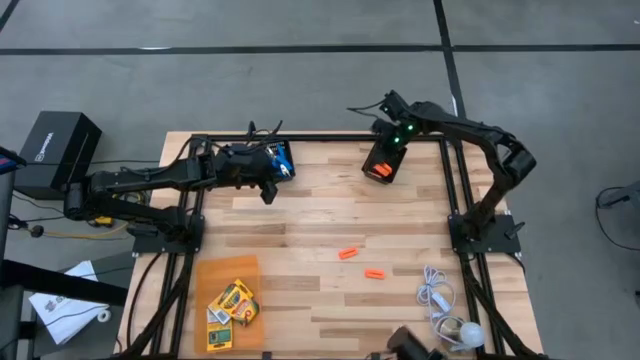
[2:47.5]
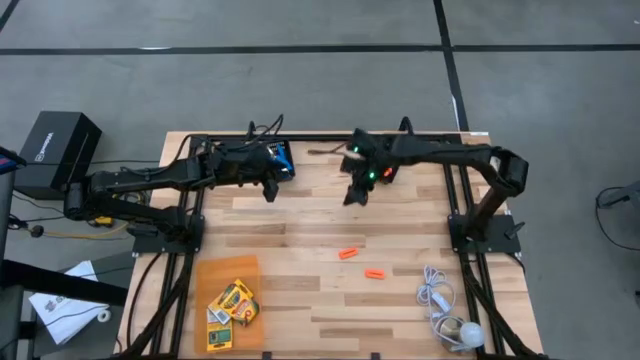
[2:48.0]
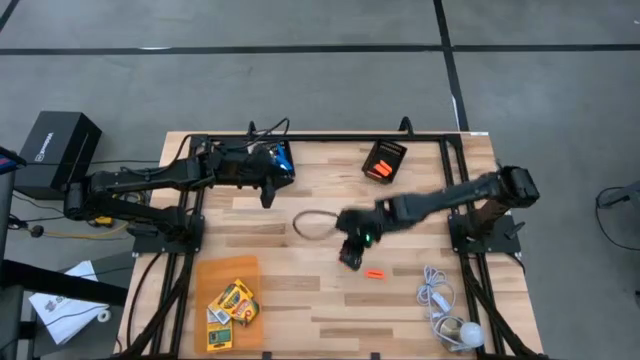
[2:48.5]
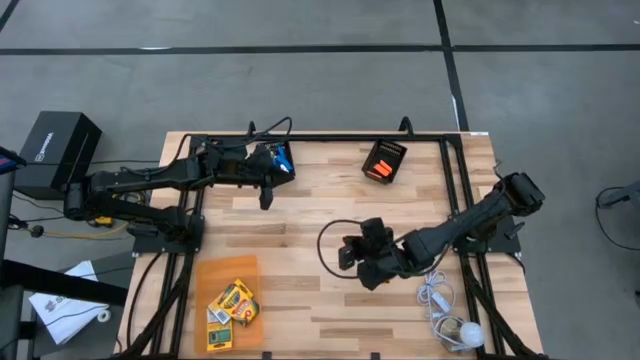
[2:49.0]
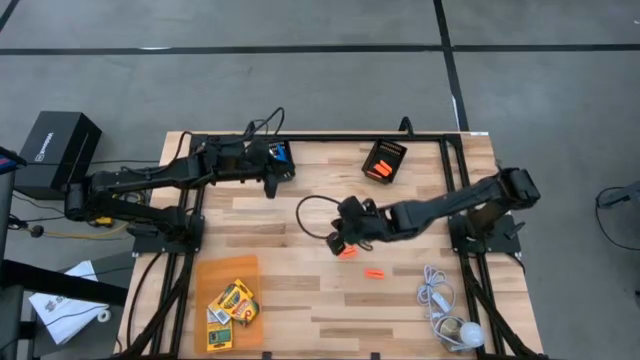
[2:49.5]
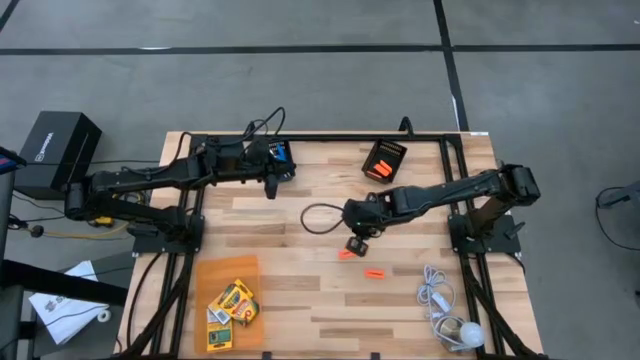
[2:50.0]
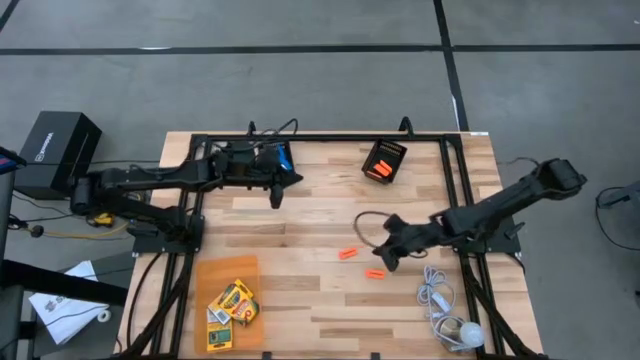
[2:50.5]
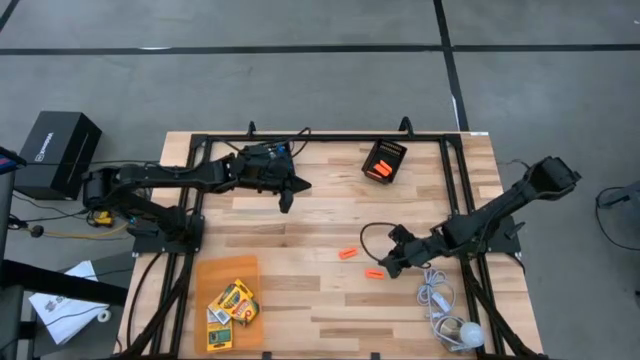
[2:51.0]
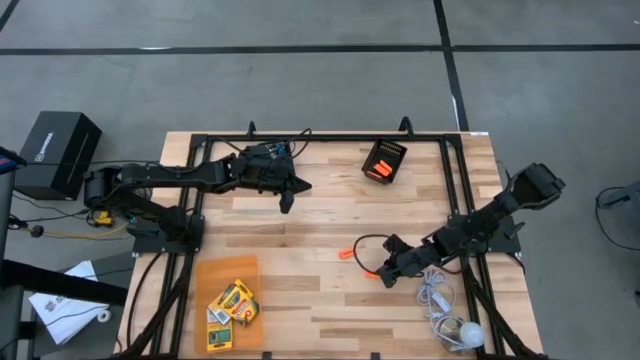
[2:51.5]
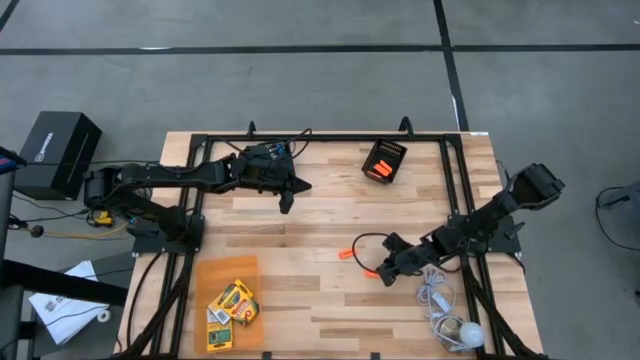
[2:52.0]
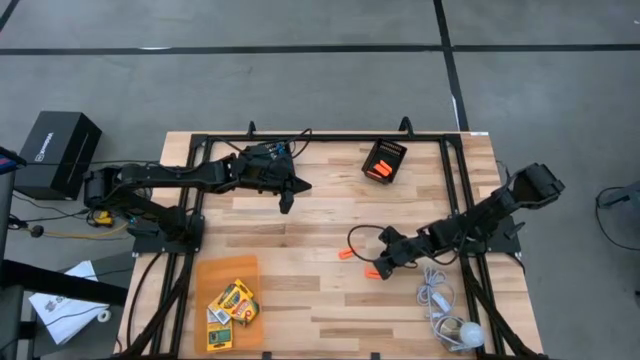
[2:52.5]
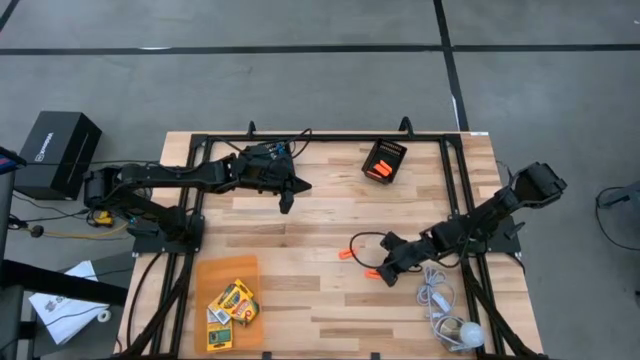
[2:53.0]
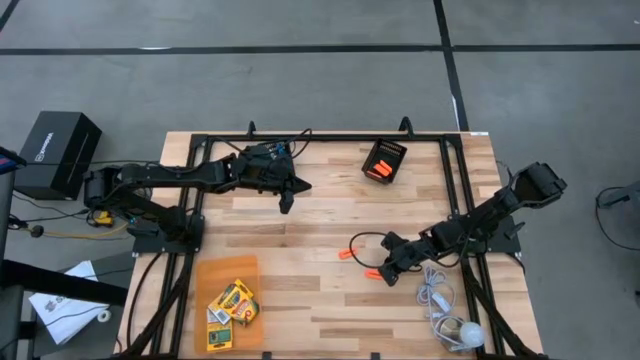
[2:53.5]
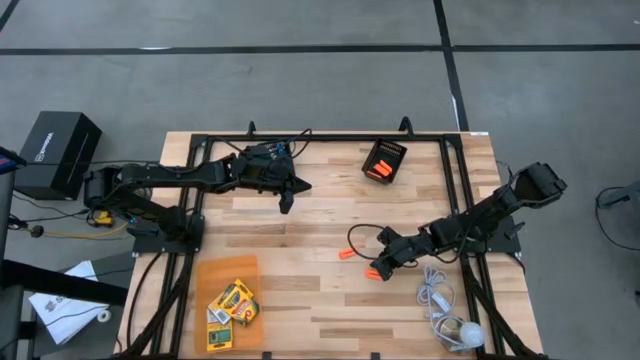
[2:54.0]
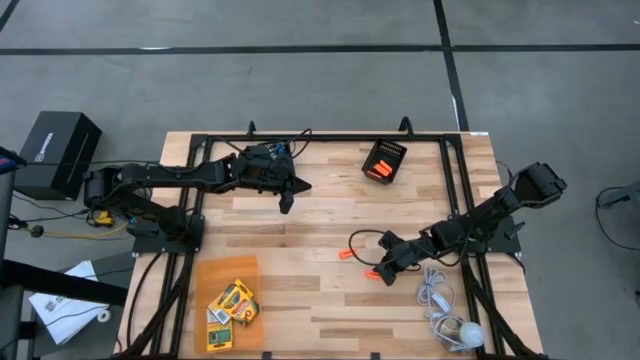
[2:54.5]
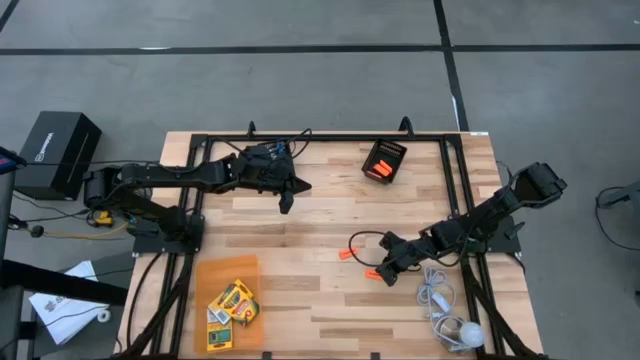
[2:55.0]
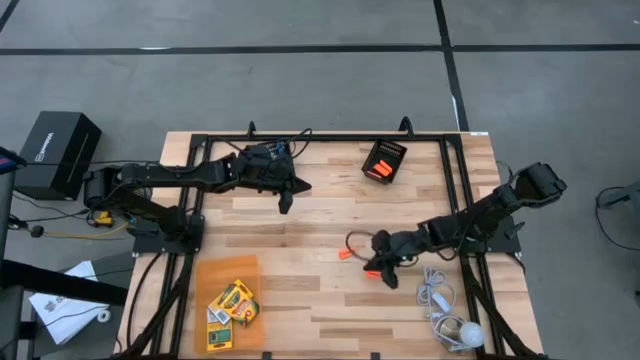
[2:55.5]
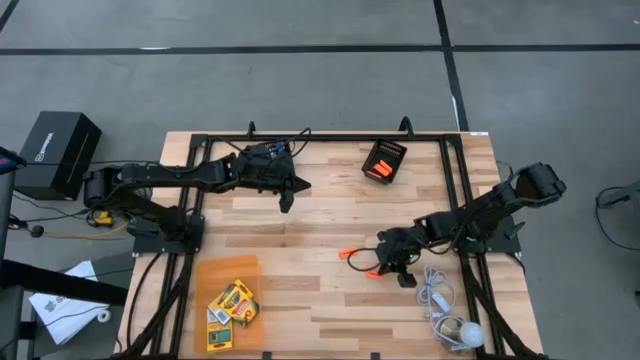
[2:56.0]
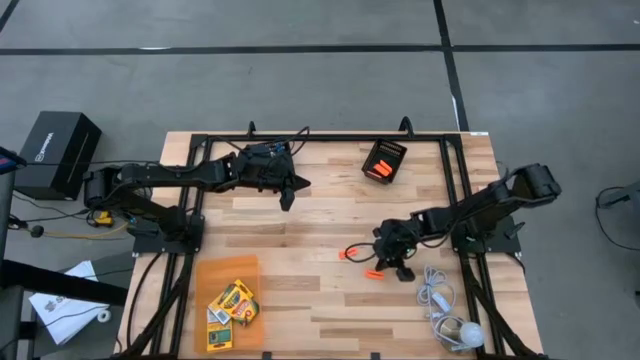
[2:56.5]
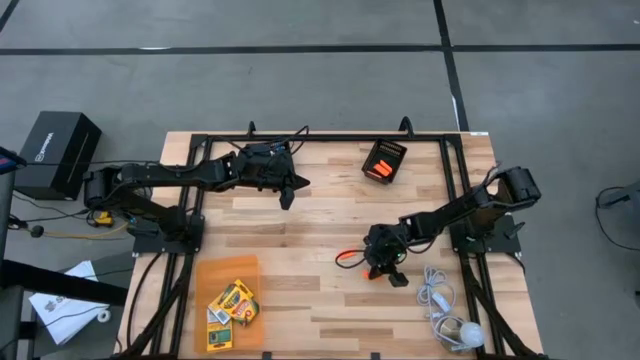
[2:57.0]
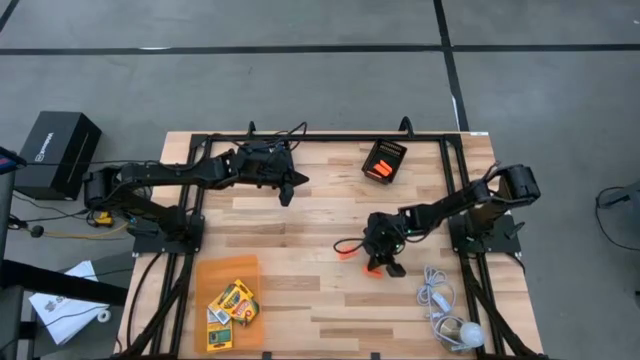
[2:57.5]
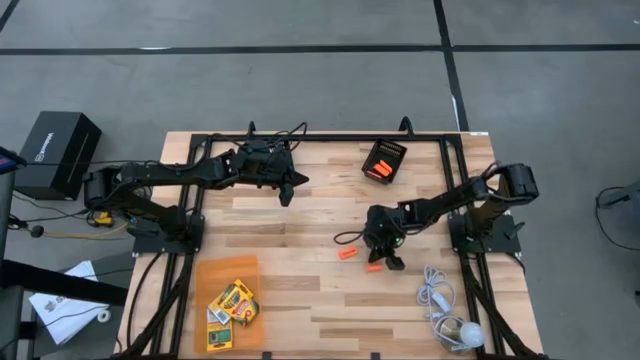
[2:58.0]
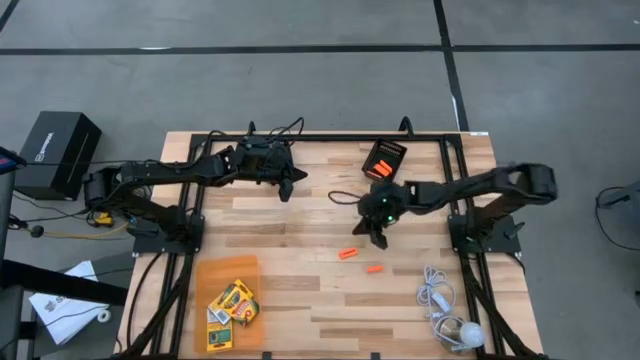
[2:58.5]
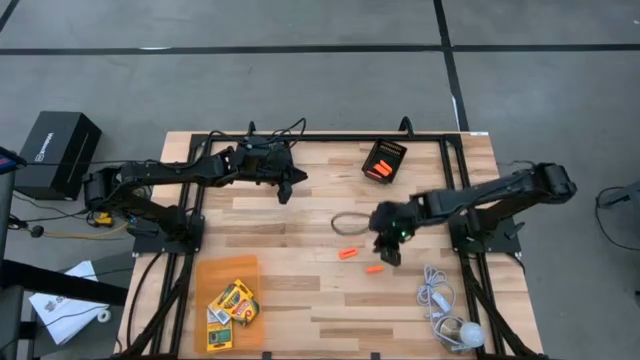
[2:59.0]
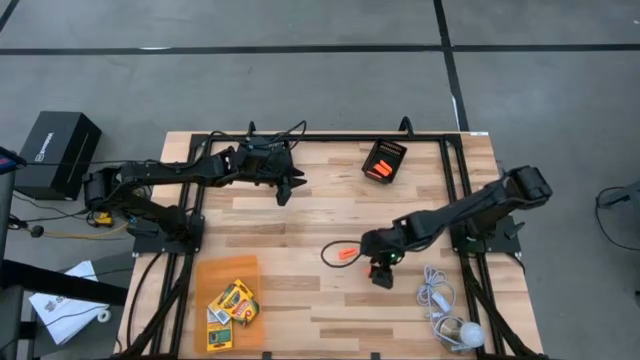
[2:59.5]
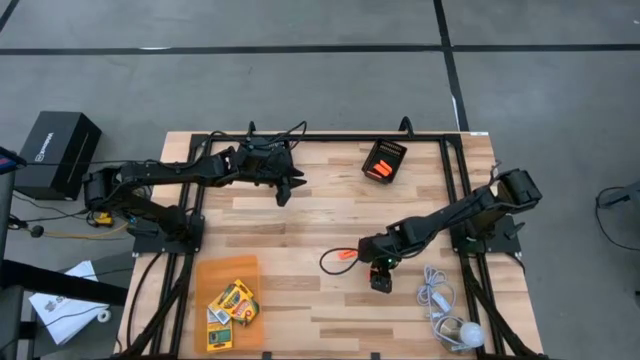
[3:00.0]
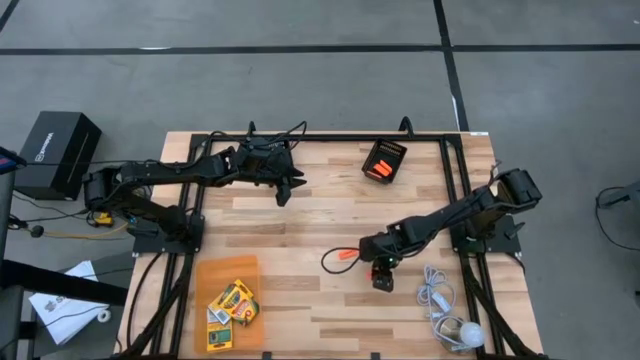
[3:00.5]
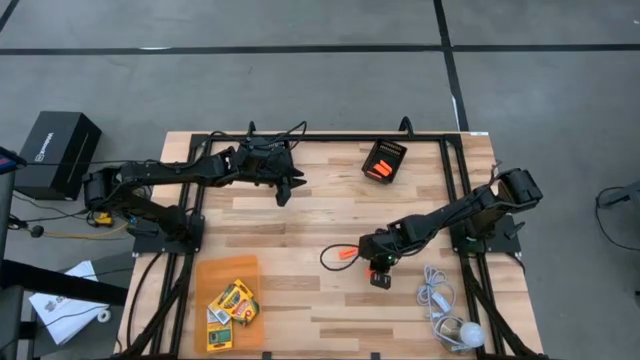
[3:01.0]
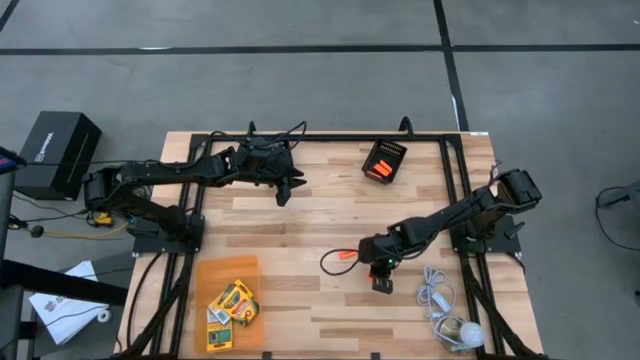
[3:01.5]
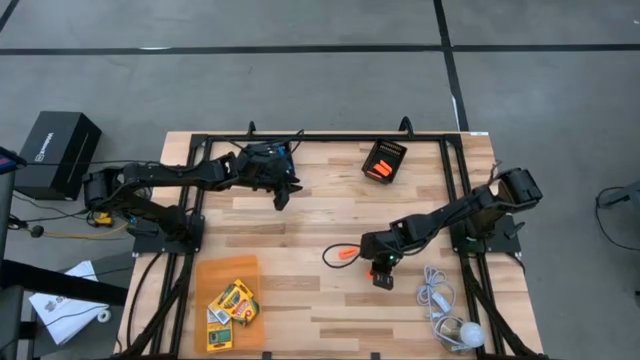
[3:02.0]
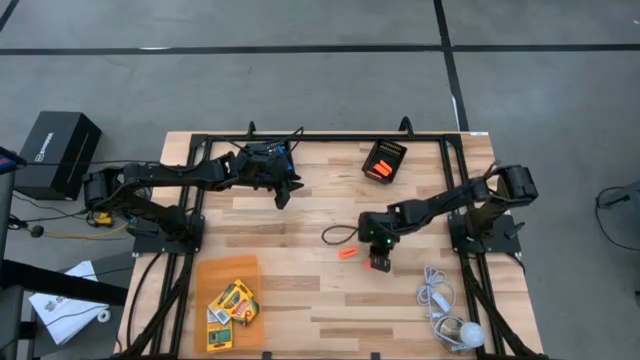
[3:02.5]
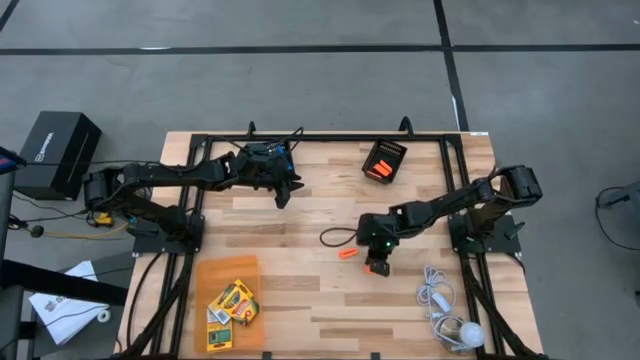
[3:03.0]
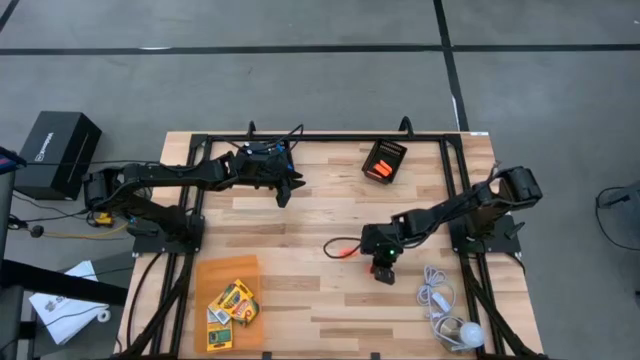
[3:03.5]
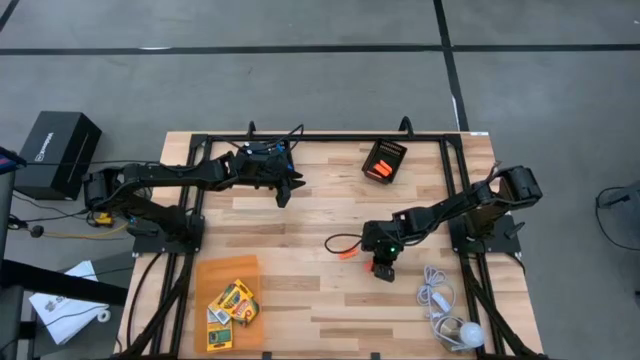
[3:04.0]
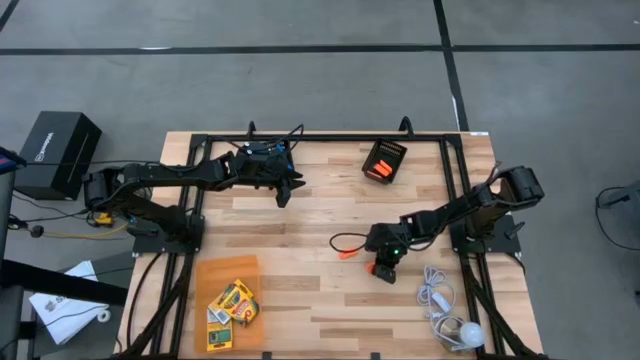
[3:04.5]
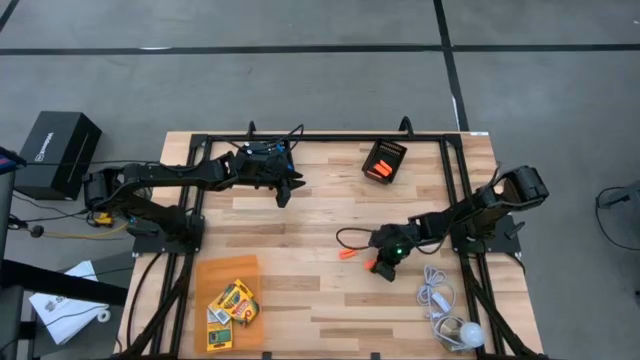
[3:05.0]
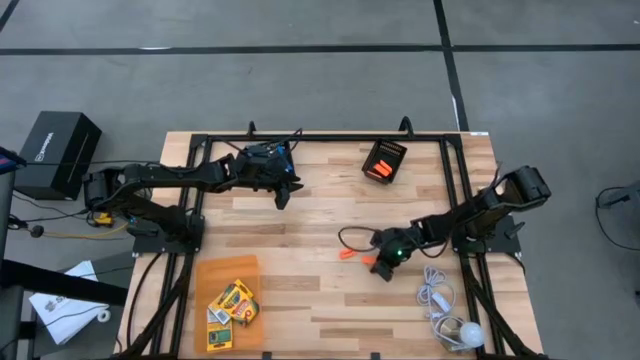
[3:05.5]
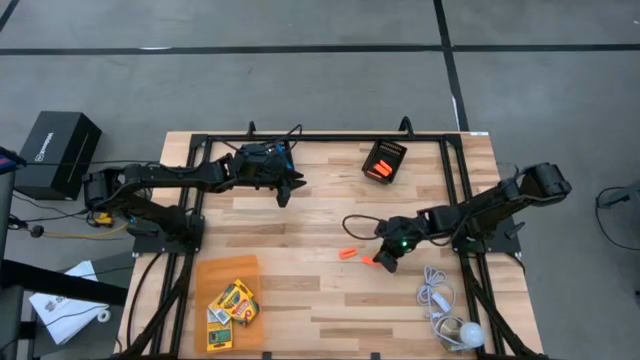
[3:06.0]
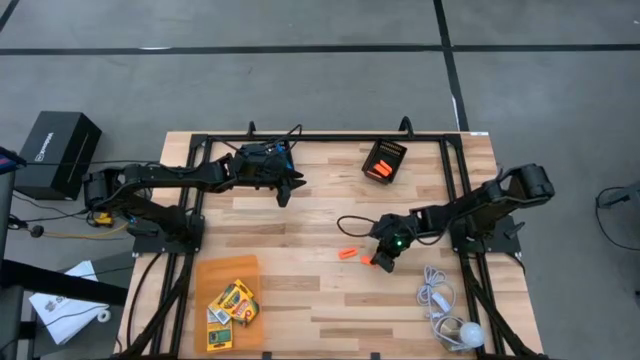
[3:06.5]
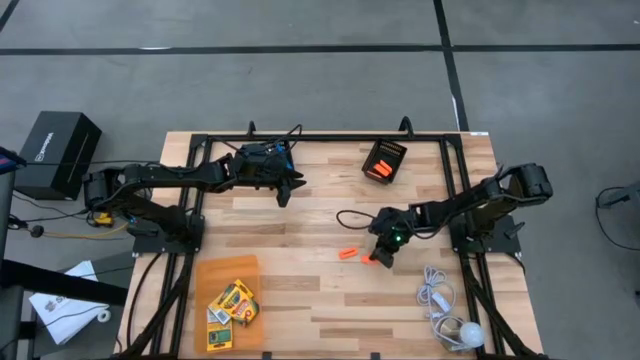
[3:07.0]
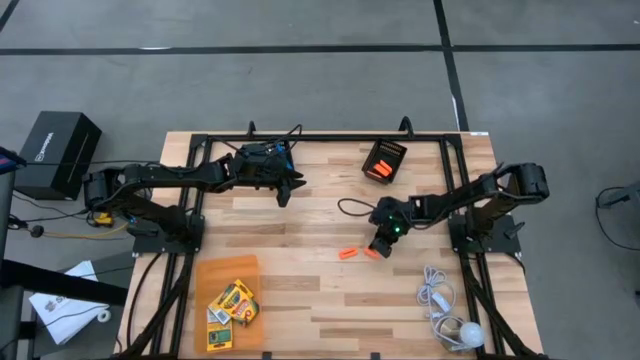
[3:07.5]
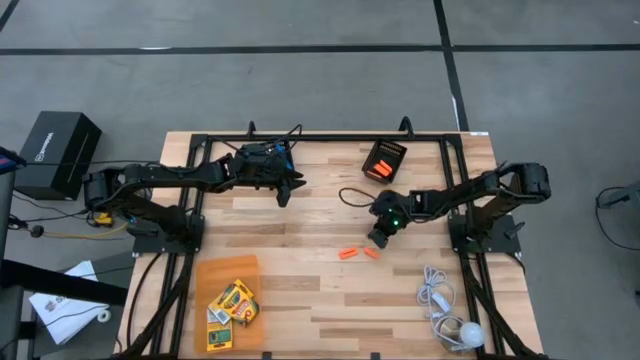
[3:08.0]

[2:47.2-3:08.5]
Task: Pick & Place School Supplies
Put the orange eraser into the right black bin

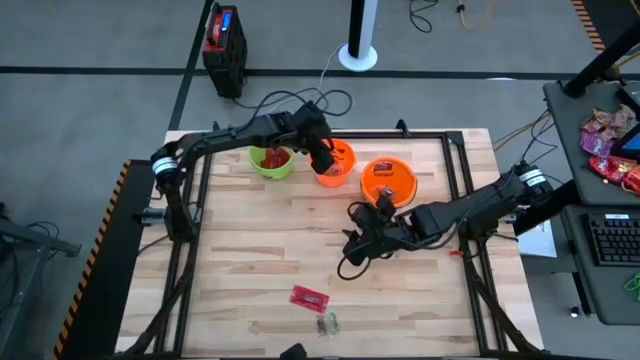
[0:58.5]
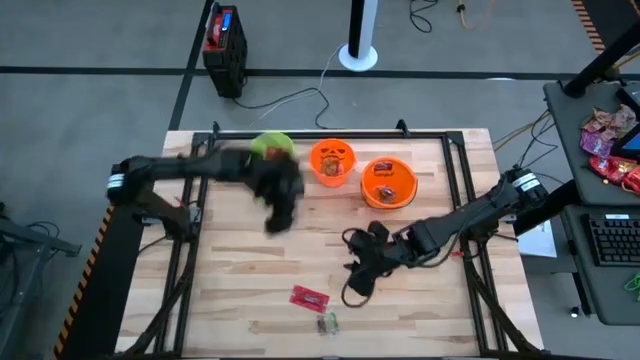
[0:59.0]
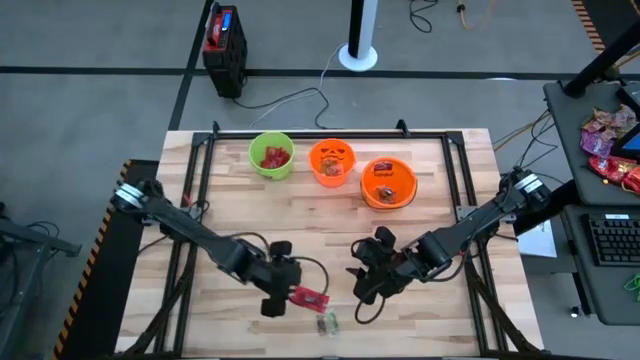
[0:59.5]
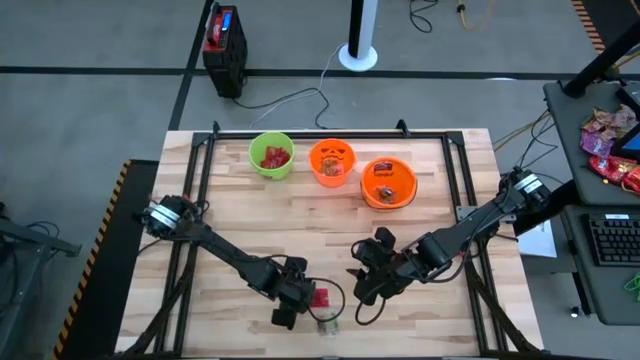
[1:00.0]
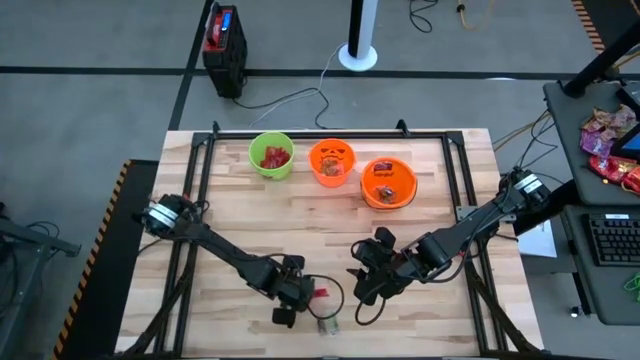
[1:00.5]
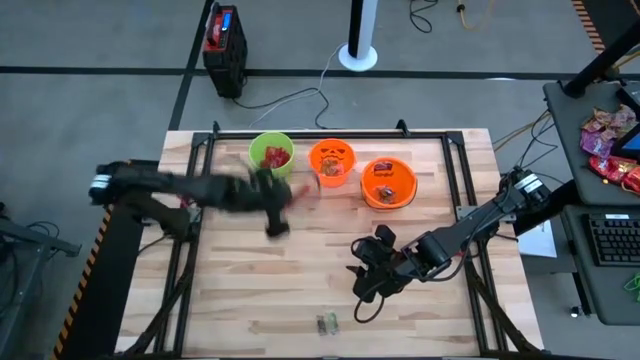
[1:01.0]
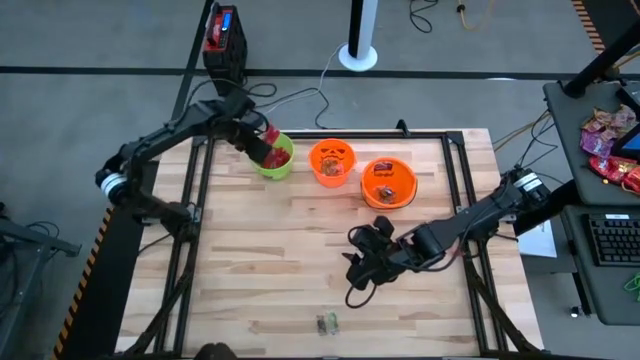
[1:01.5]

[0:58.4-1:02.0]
Task: Sort candy by brand, put in halloween buckets
Put the red candy into the green bucket
